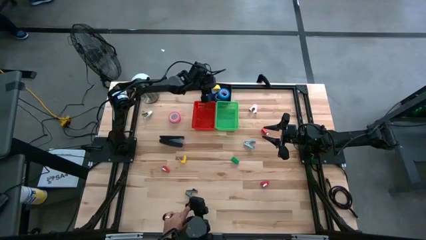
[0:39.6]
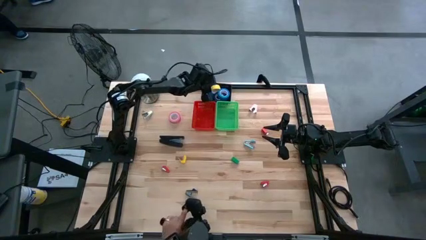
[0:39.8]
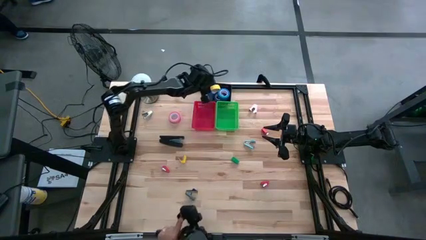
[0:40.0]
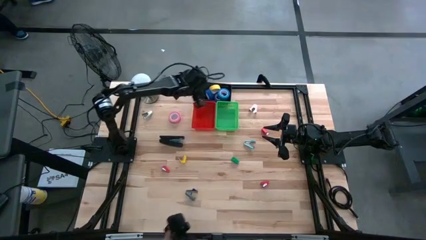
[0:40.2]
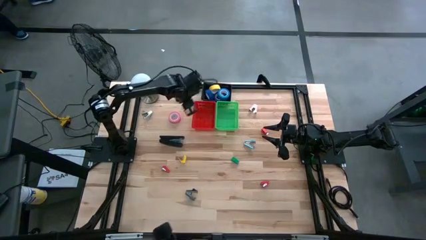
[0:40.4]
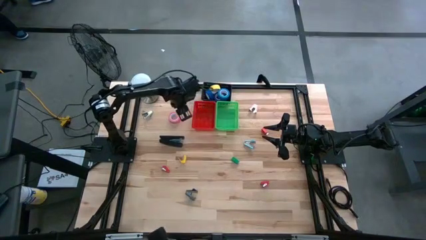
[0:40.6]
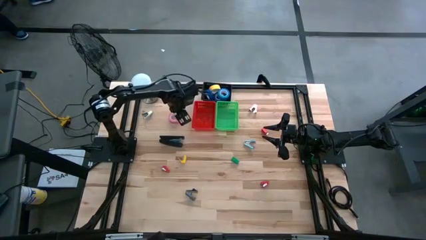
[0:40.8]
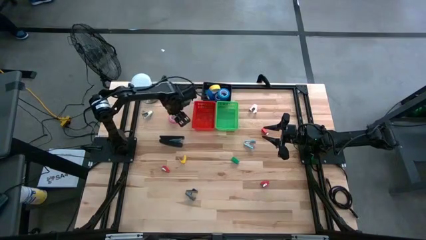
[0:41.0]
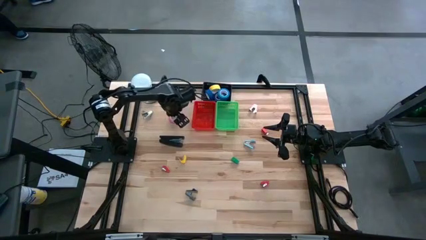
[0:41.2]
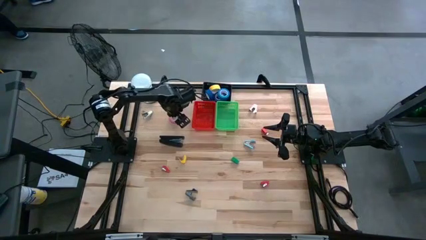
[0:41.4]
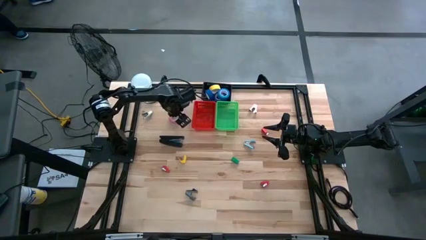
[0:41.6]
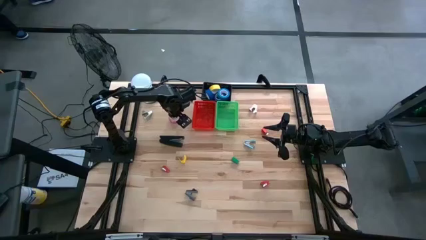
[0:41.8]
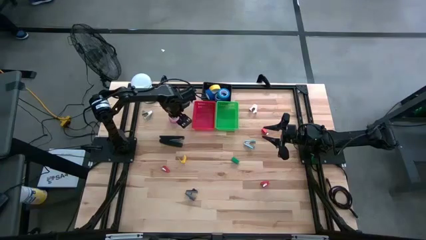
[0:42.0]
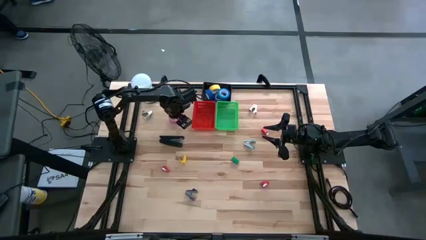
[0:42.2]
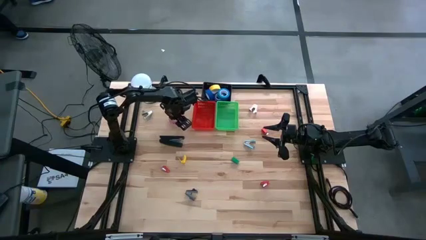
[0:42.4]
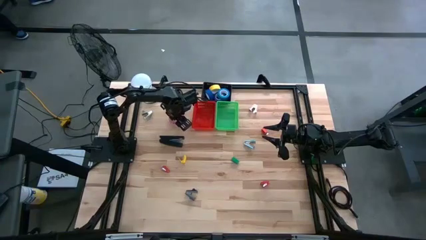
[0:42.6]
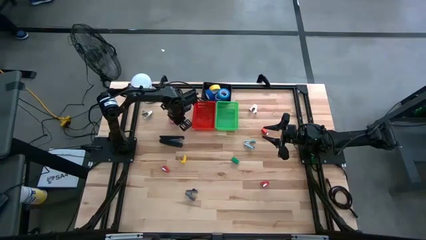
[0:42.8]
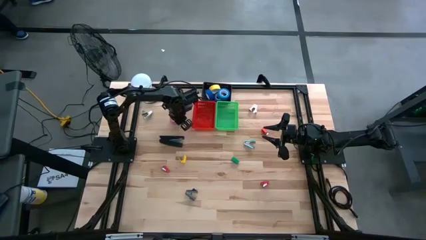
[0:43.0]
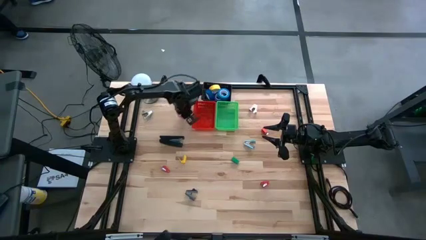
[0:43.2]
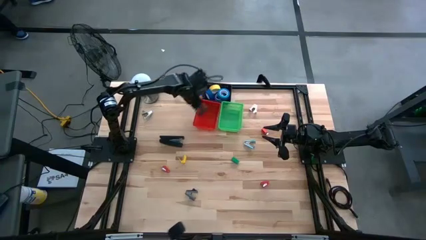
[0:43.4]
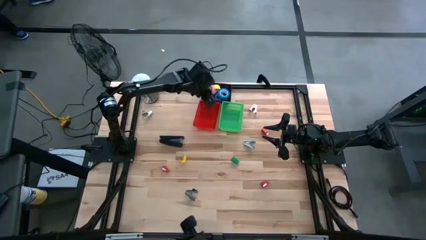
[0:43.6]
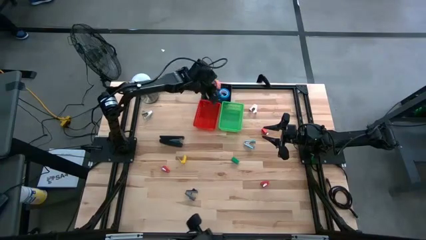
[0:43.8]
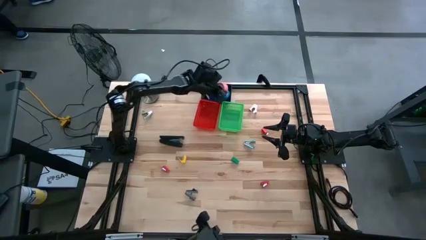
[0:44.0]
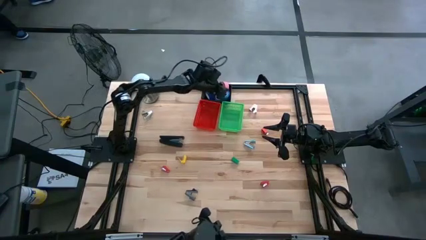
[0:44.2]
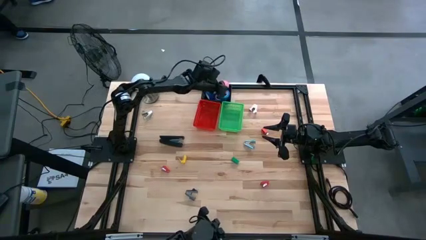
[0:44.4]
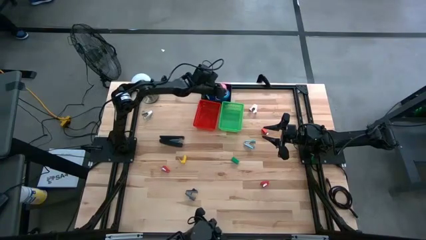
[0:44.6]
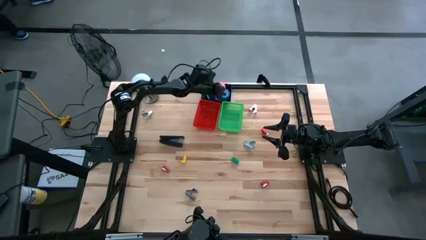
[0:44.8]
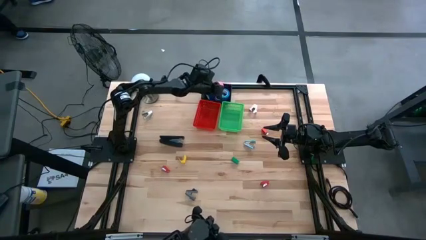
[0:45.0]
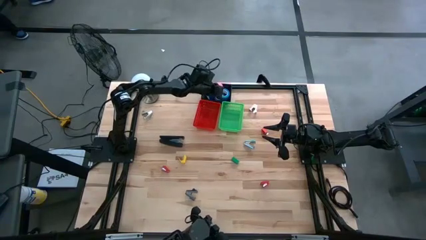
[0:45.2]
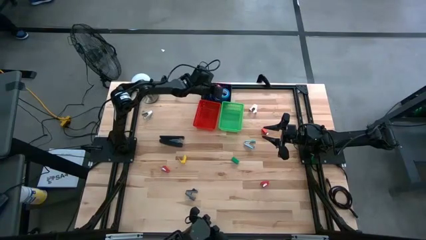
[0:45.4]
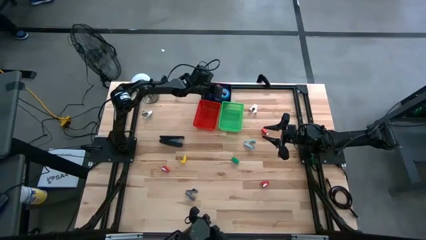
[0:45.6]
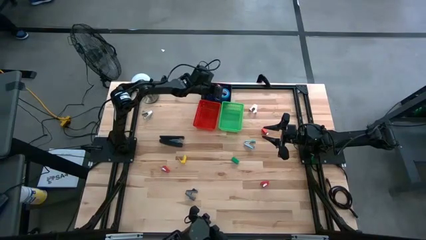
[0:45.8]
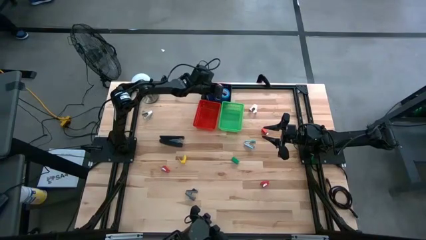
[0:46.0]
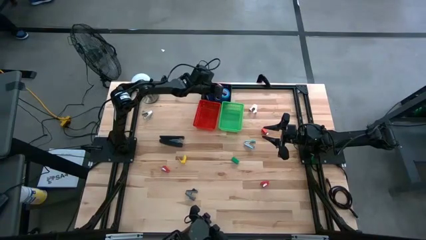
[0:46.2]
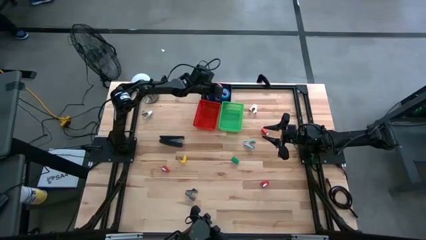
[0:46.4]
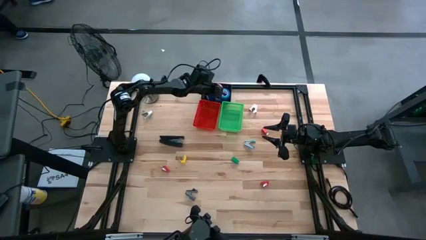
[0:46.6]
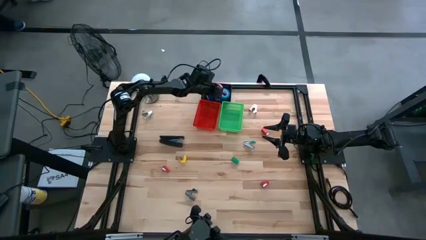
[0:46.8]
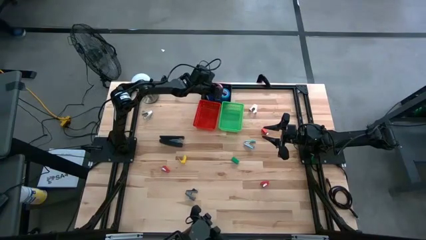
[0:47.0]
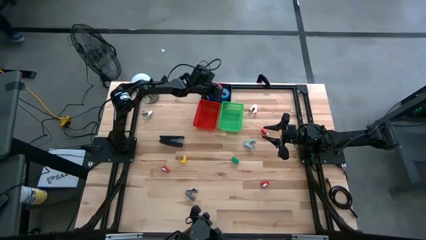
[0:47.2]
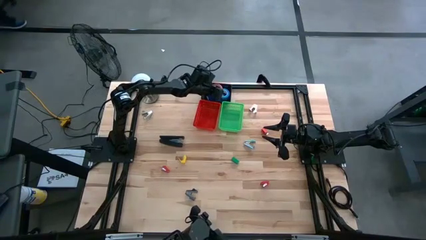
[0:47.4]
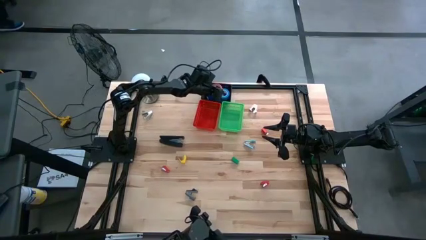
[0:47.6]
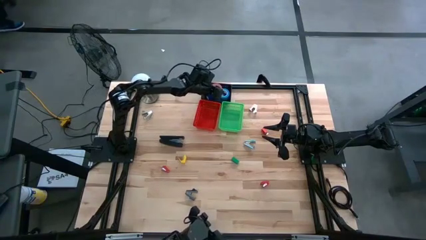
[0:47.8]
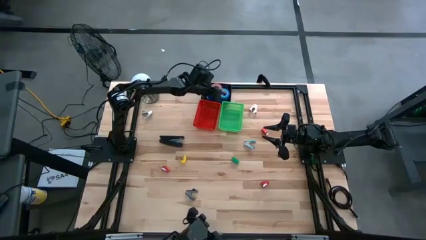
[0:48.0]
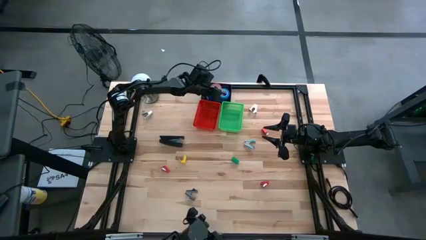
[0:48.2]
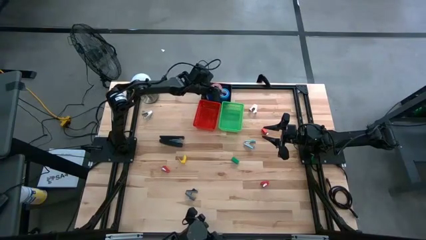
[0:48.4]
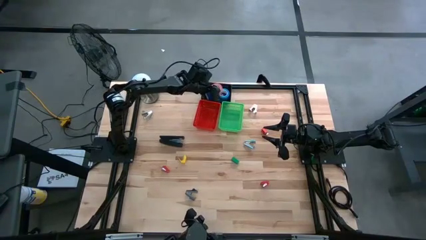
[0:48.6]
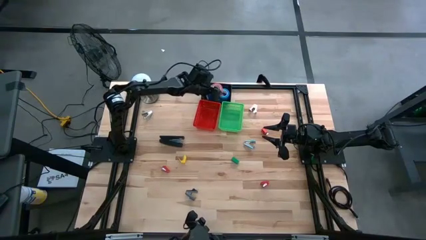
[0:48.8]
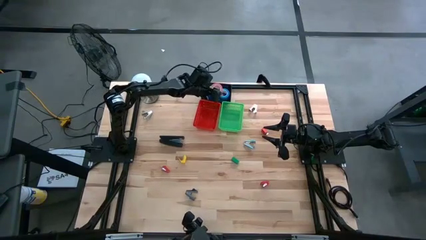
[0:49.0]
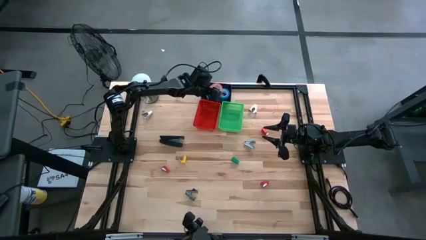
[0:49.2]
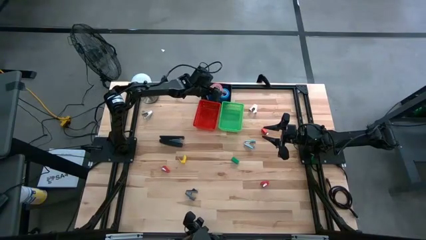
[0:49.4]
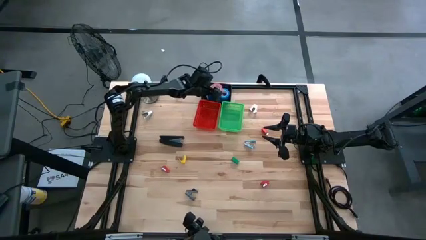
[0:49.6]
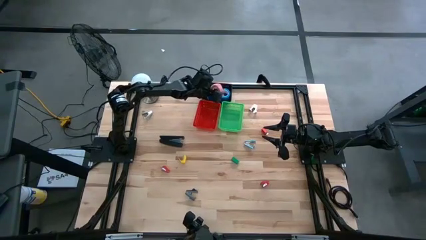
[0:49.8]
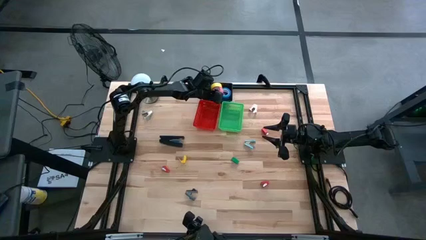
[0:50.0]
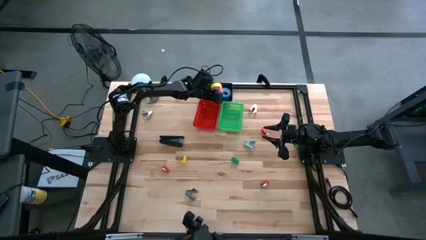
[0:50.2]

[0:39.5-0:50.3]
Task: Pick and place Stapler, Stapler remover, tape
Put the pink tape into the black bin

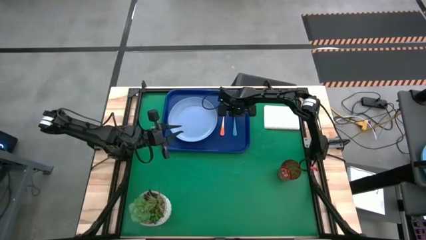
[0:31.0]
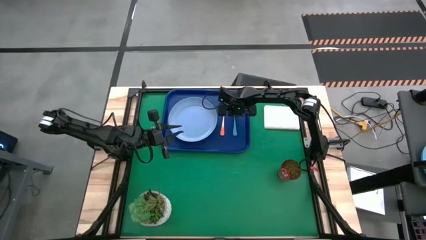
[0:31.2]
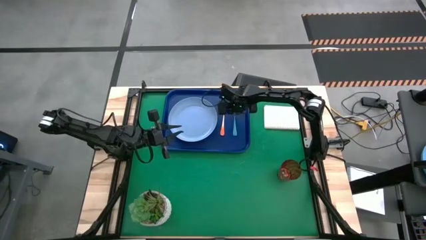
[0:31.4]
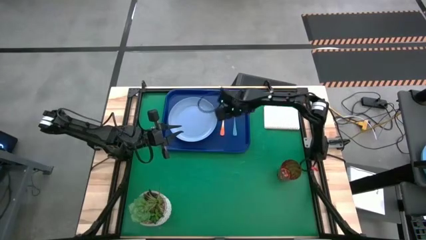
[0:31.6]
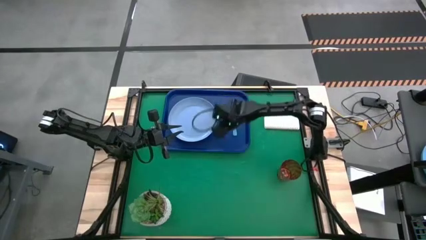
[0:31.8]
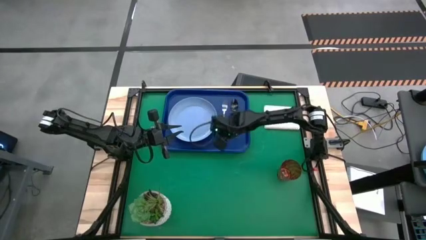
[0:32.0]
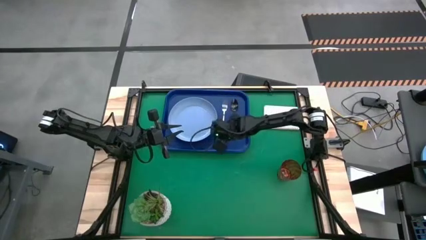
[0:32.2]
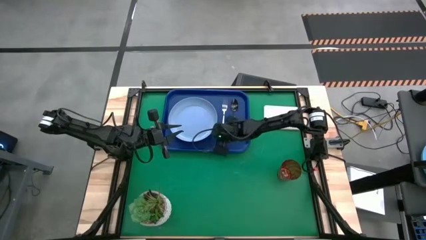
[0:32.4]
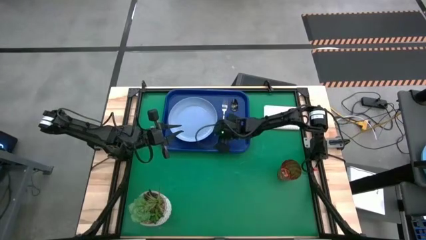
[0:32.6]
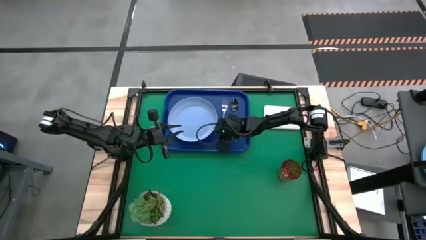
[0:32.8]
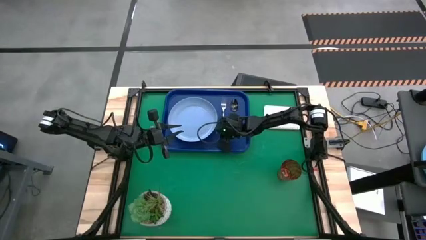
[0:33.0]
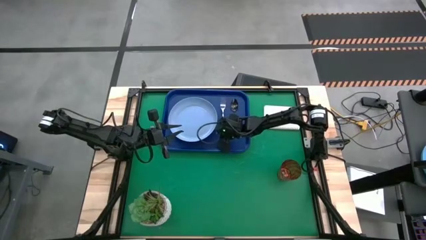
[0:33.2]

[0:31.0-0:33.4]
Task: Pick and place plate/cup/fork/spoon on tray
Adjust the orange fork on the blue tray
